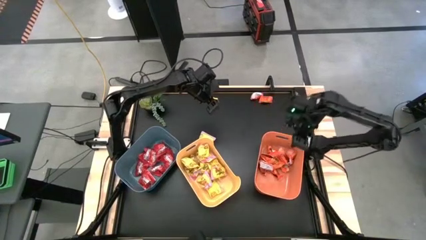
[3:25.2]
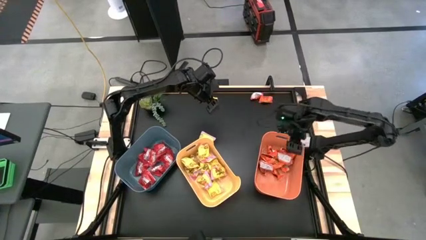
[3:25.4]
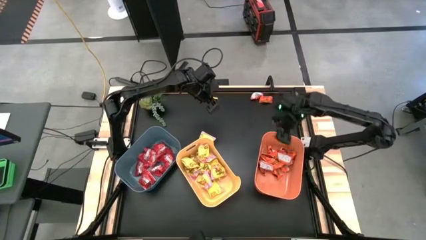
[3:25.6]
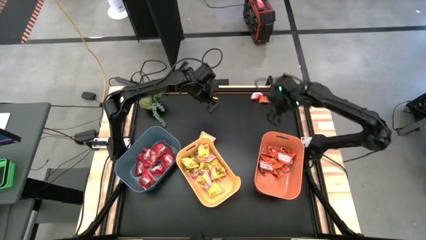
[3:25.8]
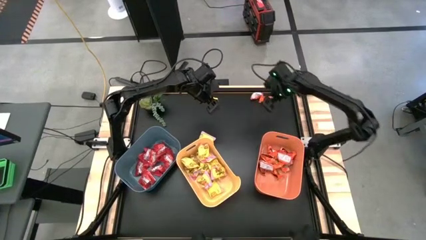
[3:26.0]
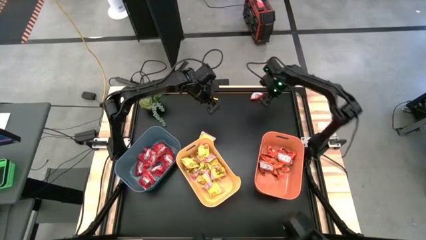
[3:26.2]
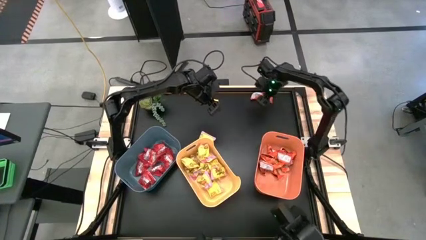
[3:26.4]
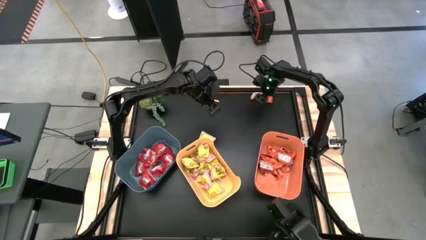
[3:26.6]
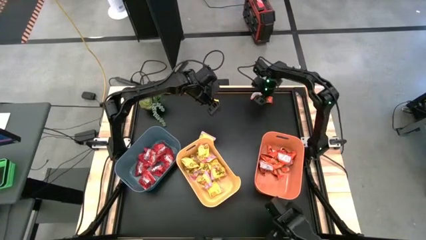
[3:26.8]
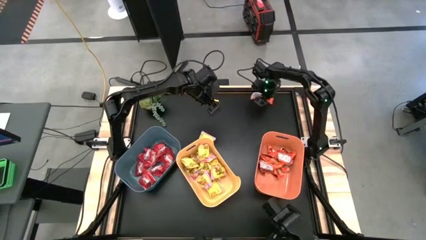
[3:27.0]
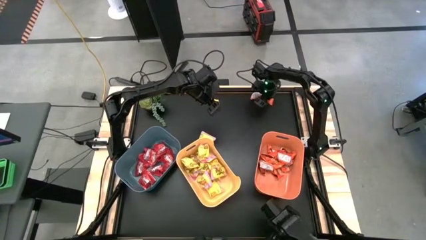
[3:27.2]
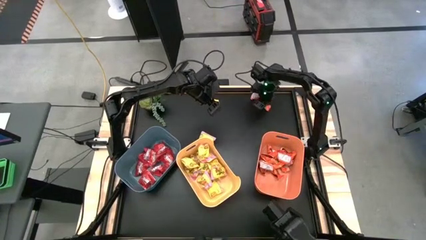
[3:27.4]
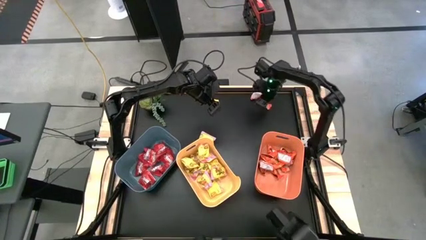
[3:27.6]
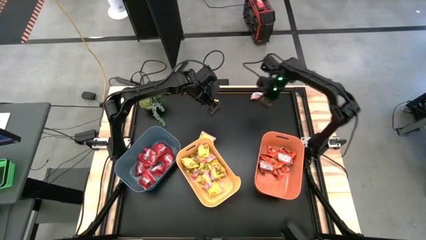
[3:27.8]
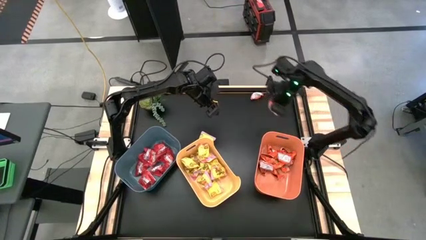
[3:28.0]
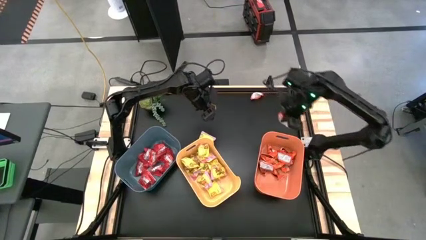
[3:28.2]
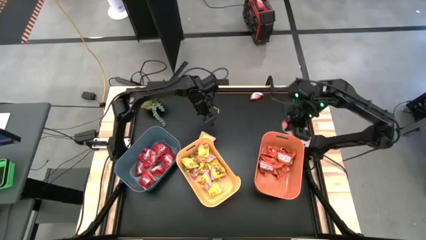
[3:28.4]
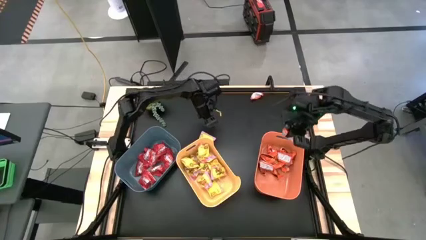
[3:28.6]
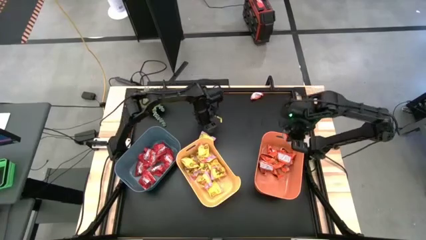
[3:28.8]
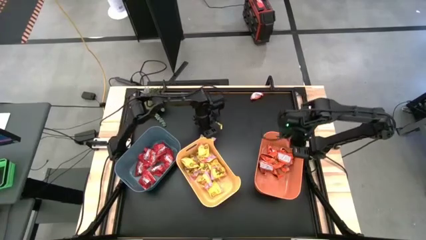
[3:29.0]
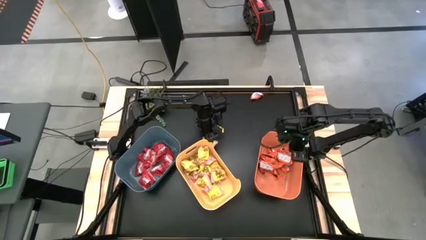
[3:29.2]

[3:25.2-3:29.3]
Task: Sort candy
Put the orange chocolate into the orange bin

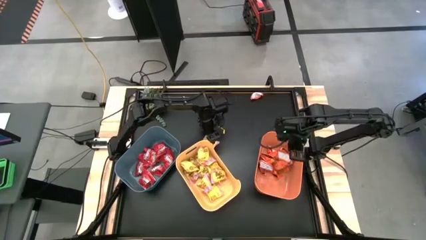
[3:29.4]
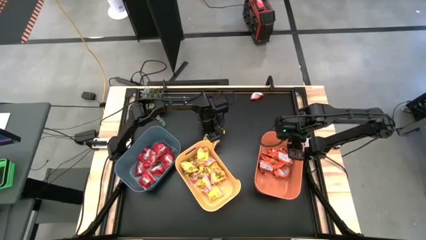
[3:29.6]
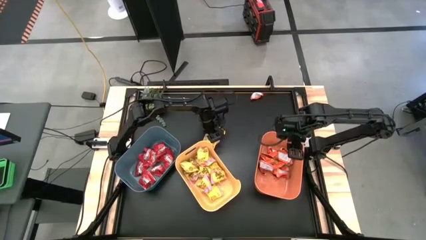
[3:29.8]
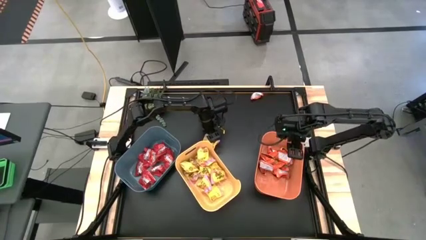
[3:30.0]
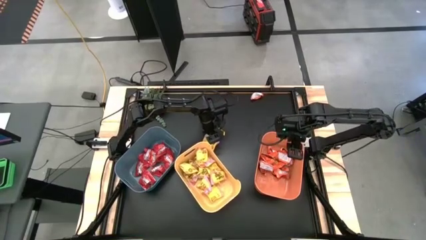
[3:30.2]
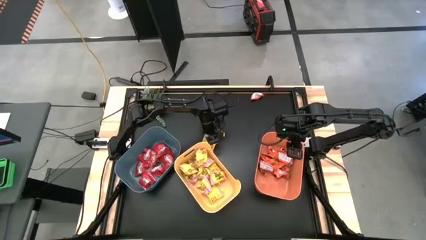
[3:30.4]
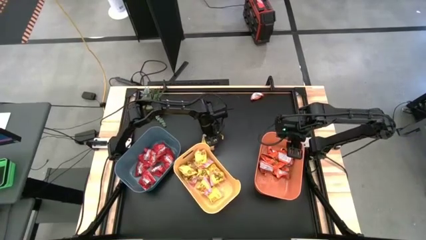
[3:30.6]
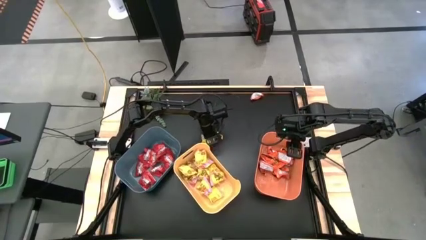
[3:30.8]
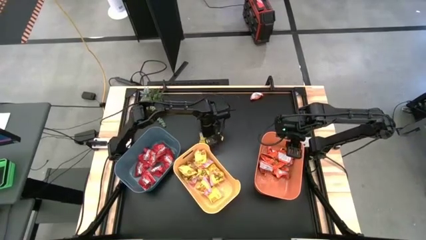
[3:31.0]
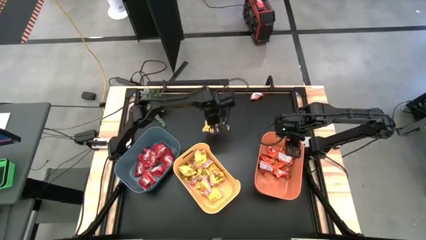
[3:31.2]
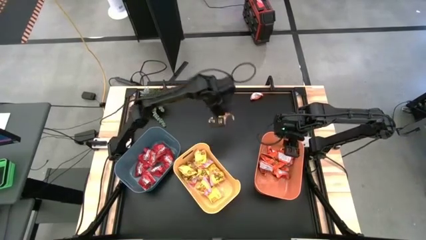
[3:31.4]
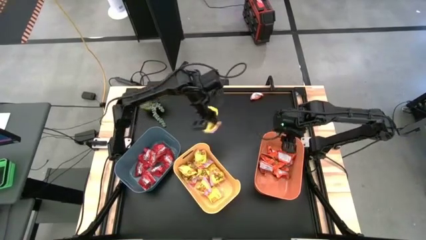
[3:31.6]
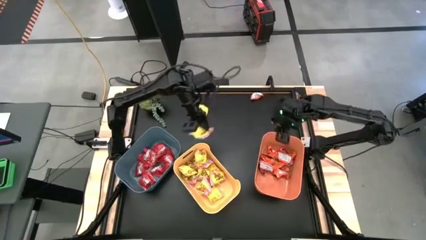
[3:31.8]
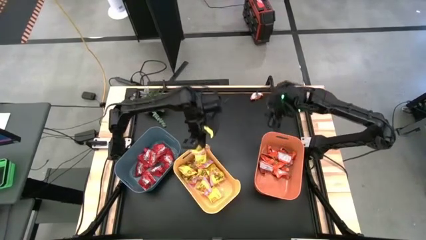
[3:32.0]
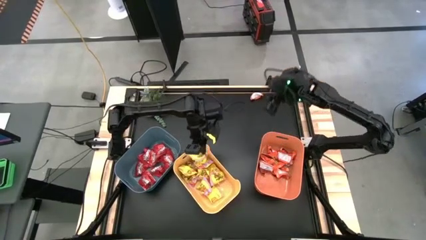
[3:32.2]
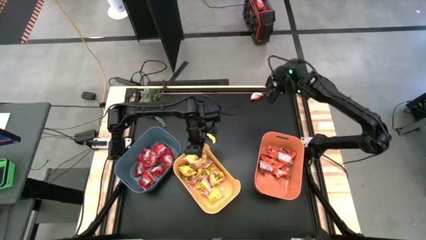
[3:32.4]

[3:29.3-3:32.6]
Put the yellow candy into the yellow bin

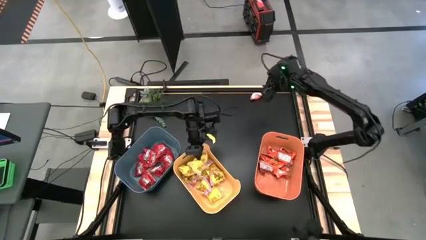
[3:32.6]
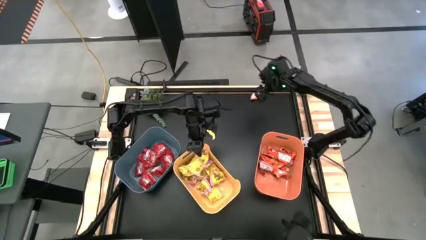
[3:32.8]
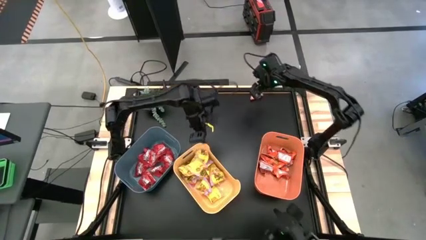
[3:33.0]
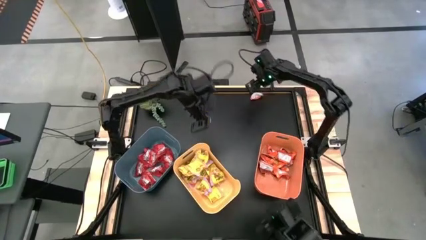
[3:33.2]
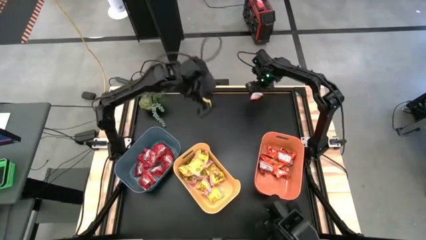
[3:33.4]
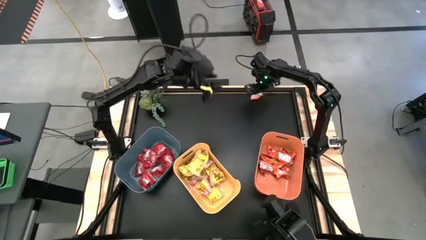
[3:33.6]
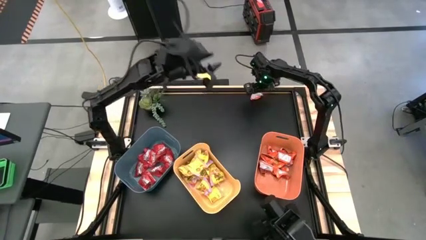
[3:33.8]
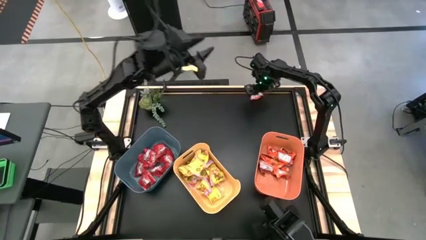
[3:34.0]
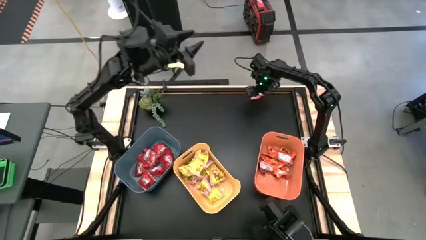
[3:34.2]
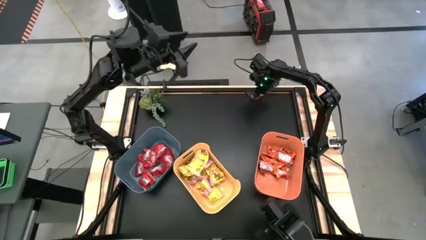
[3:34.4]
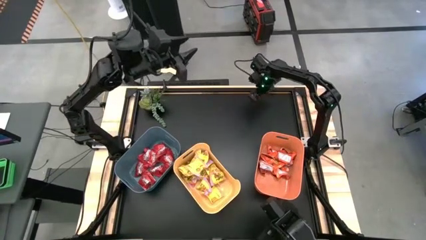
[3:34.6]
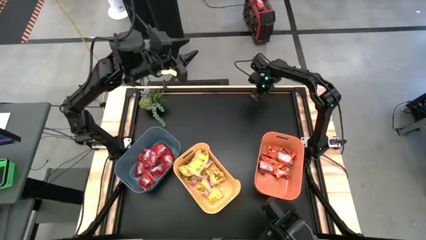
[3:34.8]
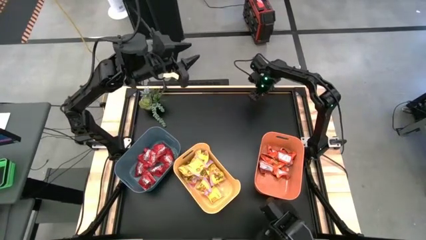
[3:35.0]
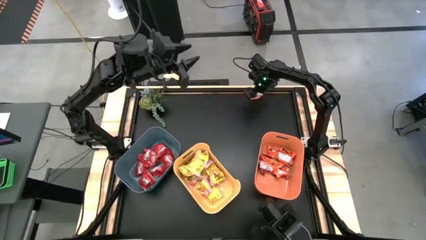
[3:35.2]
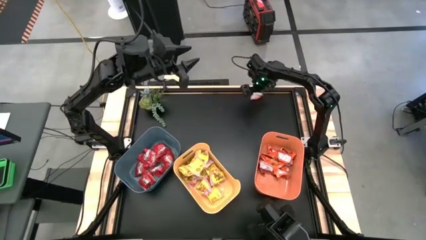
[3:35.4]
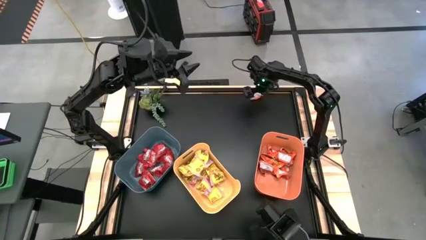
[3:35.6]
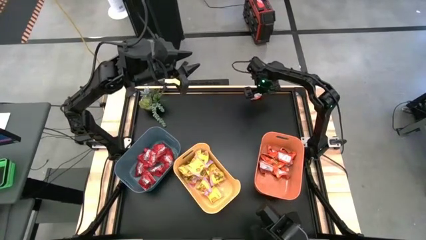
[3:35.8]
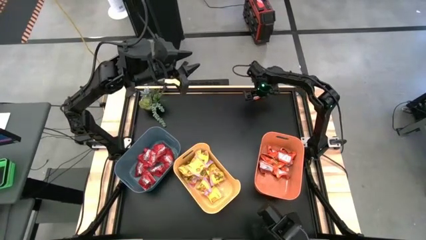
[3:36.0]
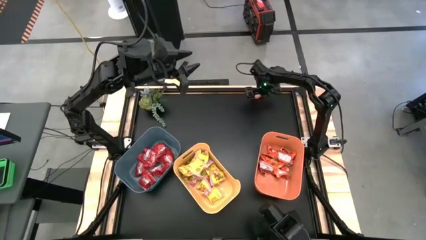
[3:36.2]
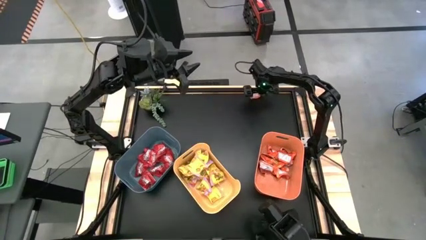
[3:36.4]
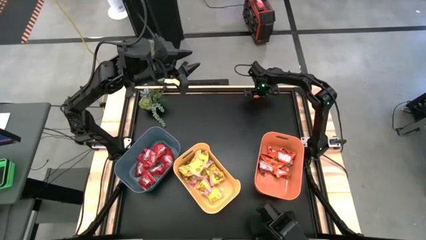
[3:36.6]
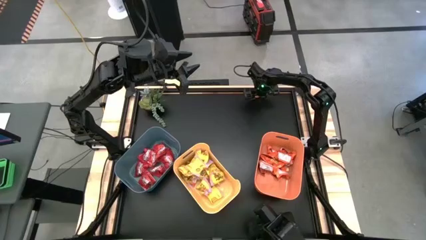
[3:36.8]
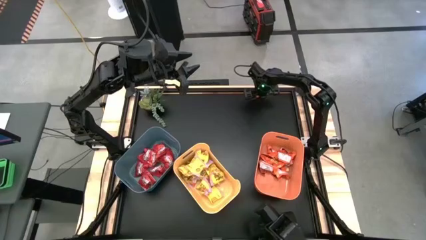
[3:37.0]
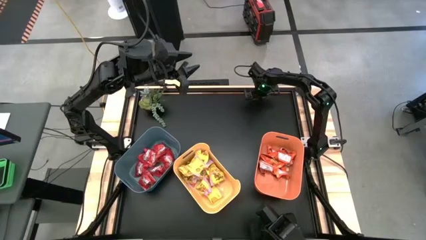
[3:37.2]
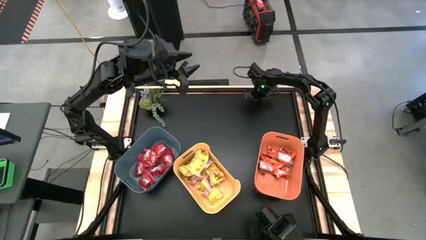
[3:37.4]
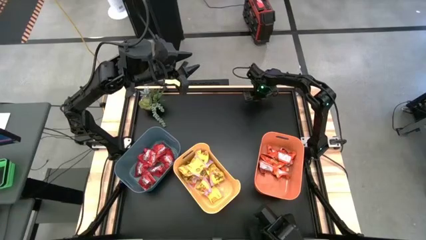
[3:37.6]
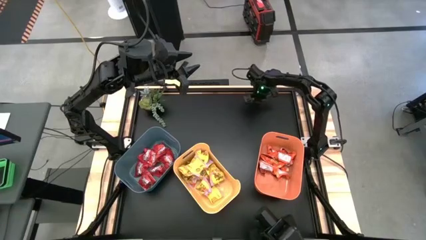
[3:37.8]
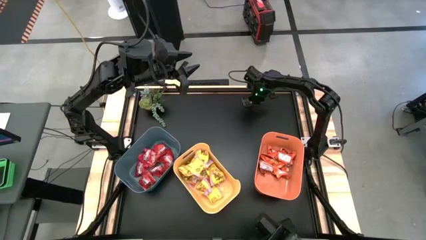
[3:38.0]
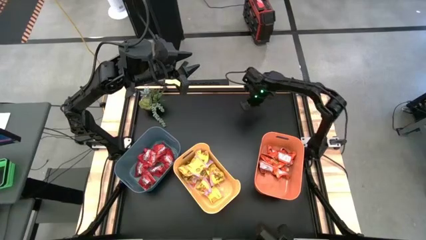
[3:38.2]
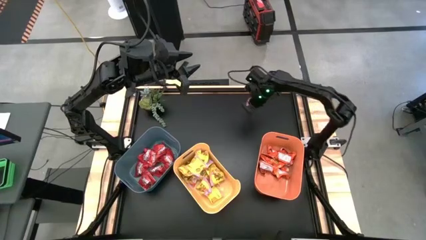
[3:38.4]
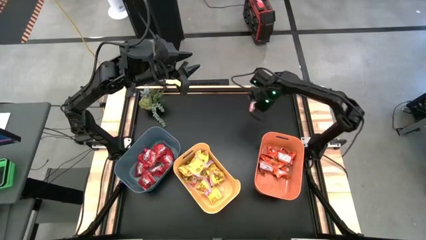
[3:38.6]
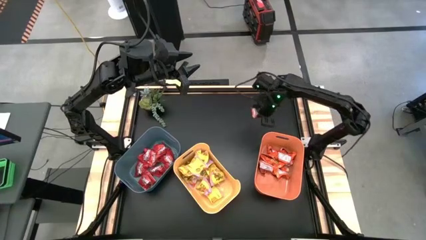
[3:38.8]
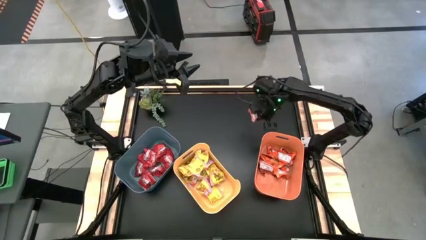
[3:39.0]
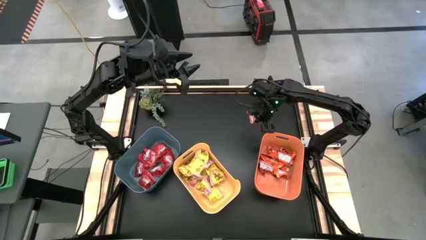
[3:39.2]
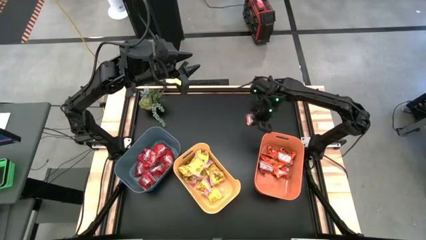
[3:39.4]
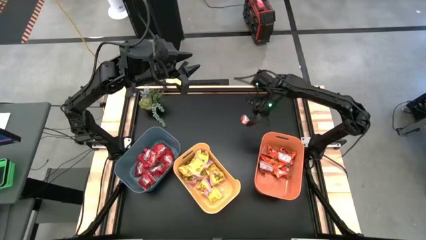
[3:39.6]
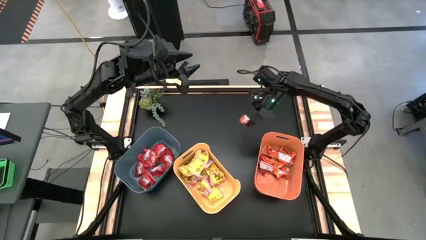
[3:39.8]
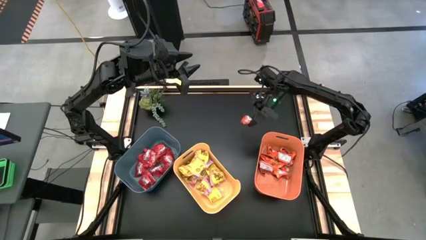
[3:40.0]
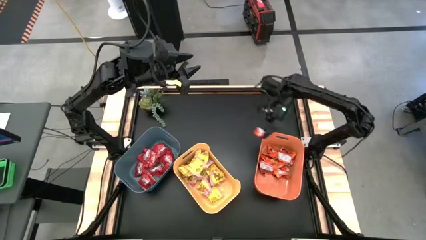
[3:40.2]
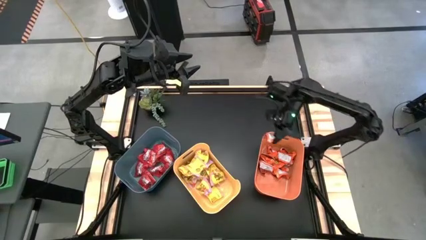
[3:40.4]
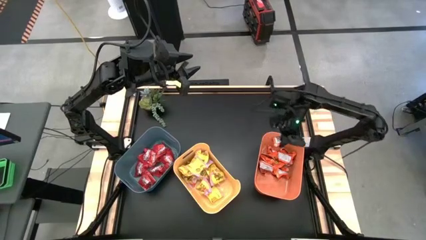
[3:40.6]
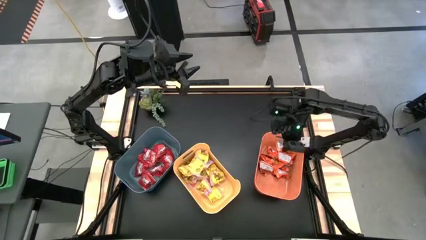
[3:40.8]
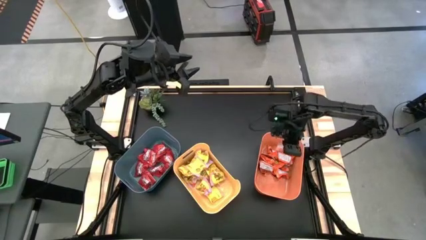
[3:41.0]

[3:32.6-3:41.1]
Put the orange chocolate into the orange bin
